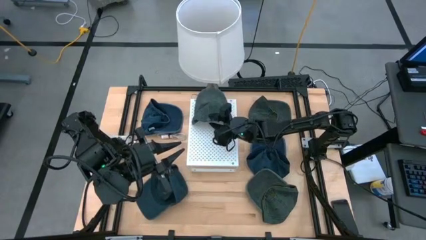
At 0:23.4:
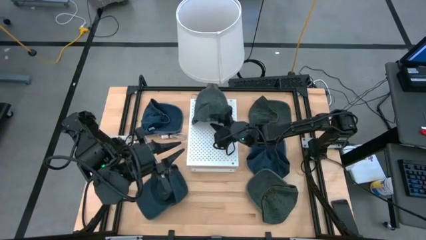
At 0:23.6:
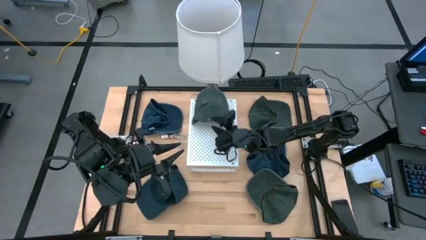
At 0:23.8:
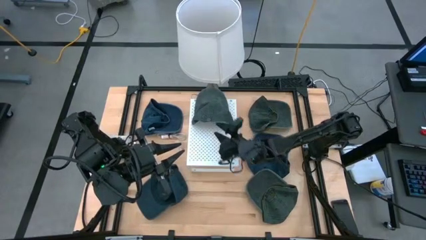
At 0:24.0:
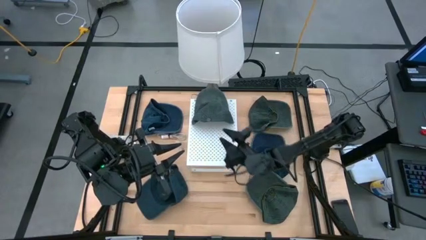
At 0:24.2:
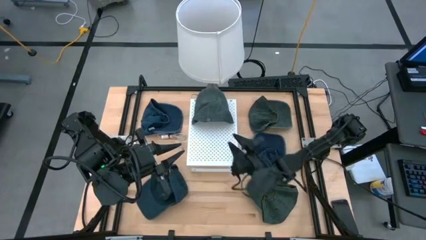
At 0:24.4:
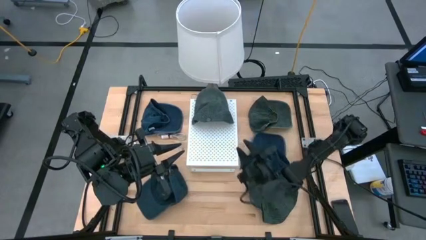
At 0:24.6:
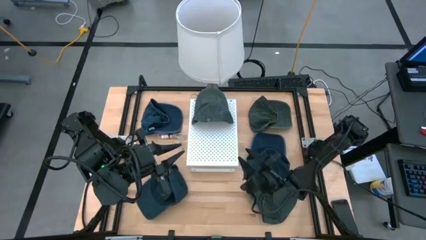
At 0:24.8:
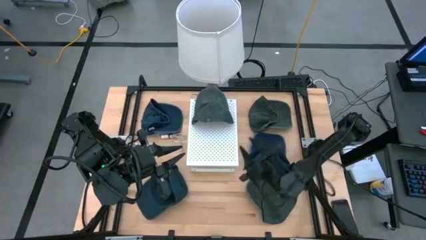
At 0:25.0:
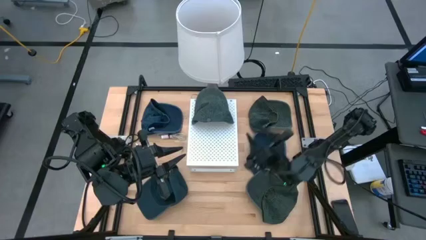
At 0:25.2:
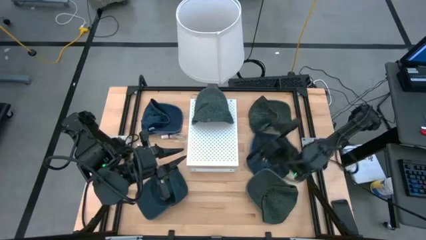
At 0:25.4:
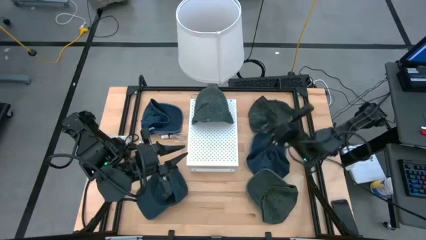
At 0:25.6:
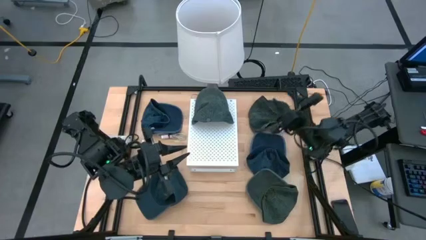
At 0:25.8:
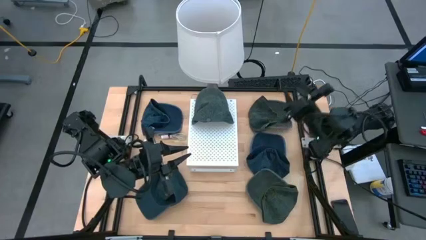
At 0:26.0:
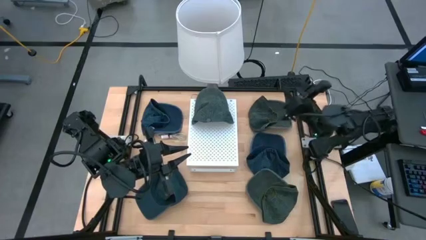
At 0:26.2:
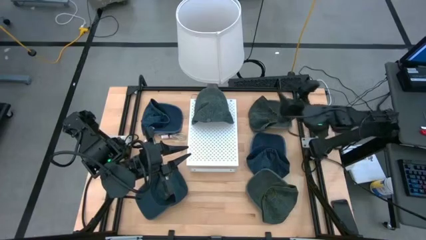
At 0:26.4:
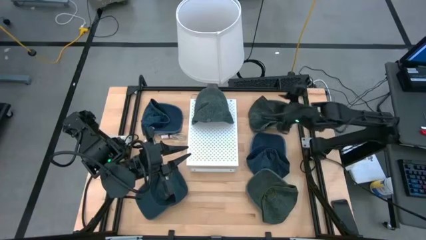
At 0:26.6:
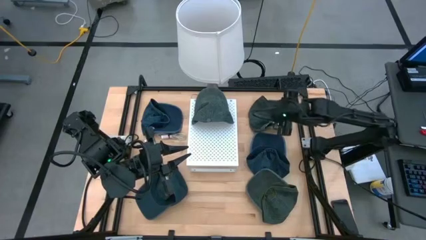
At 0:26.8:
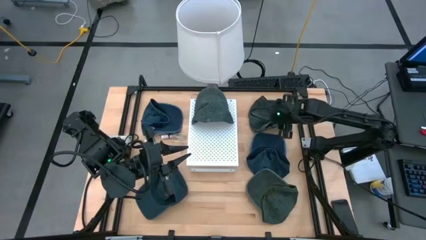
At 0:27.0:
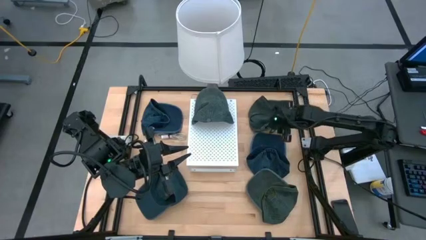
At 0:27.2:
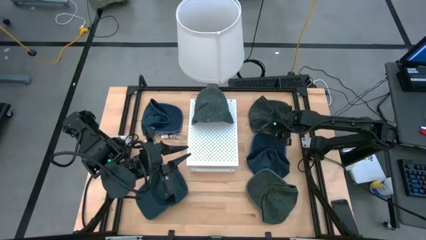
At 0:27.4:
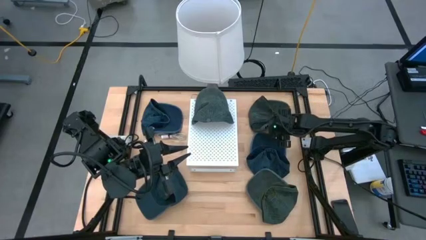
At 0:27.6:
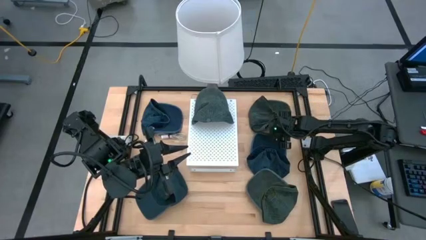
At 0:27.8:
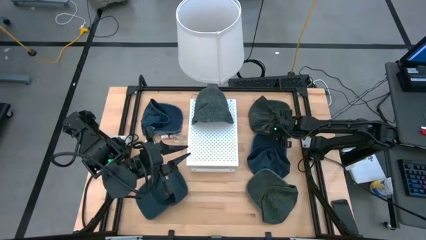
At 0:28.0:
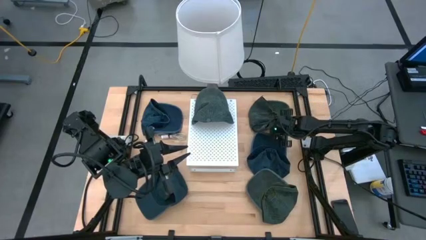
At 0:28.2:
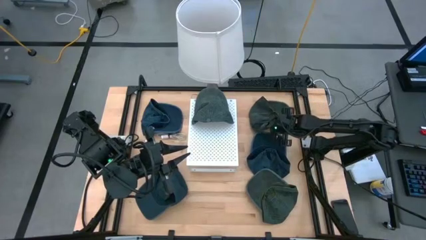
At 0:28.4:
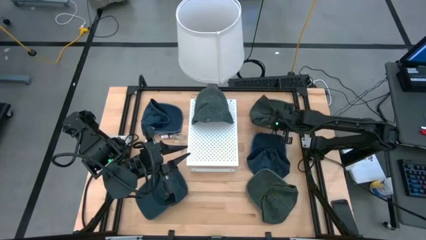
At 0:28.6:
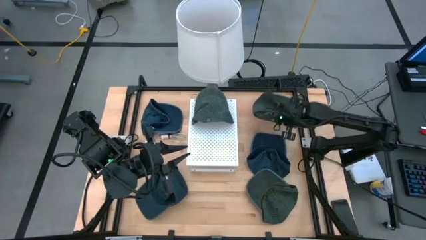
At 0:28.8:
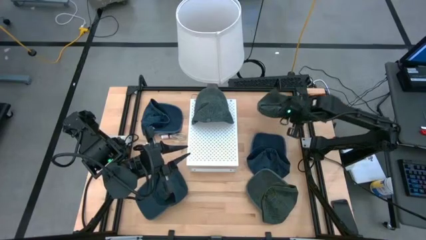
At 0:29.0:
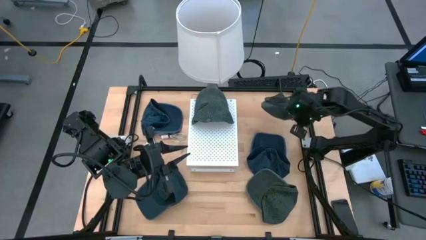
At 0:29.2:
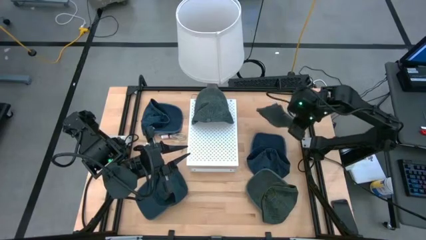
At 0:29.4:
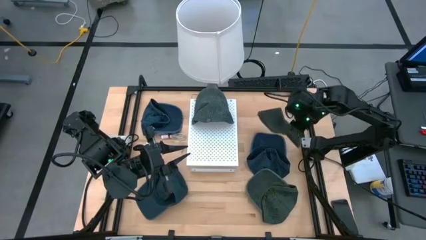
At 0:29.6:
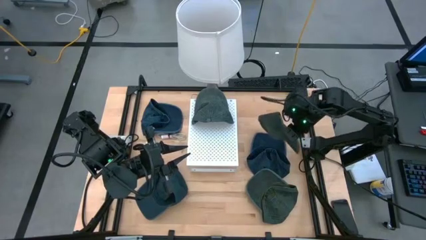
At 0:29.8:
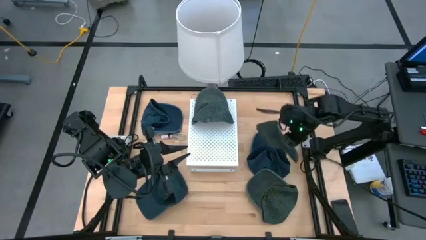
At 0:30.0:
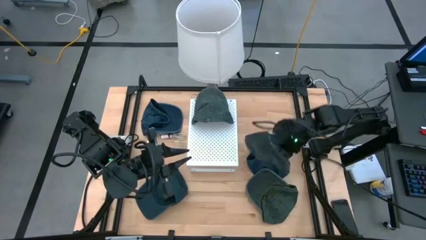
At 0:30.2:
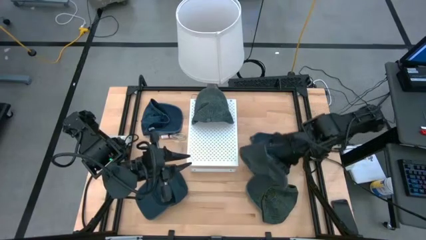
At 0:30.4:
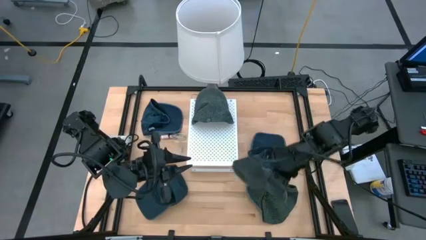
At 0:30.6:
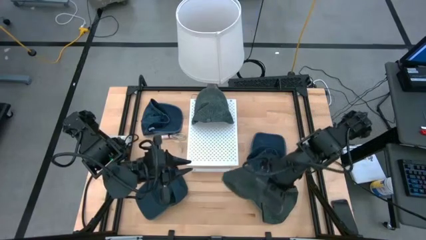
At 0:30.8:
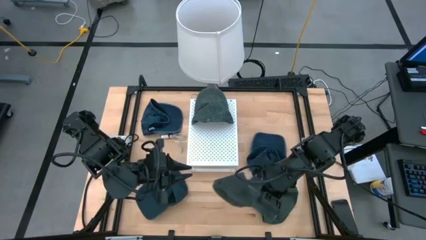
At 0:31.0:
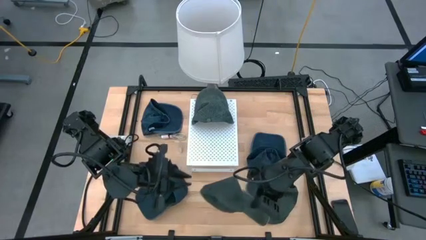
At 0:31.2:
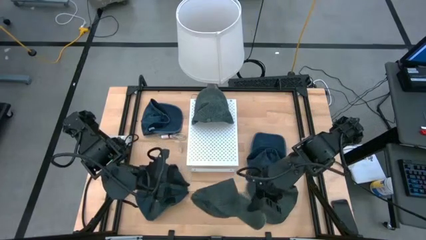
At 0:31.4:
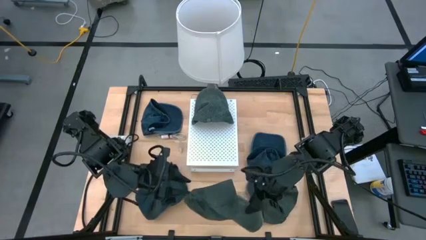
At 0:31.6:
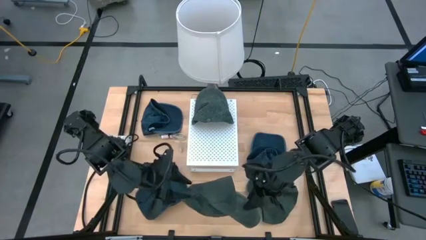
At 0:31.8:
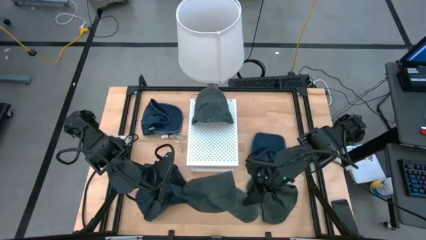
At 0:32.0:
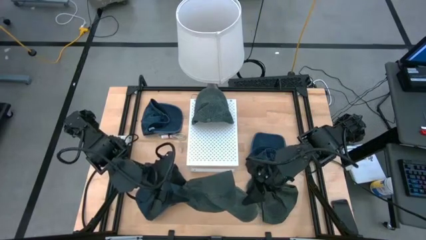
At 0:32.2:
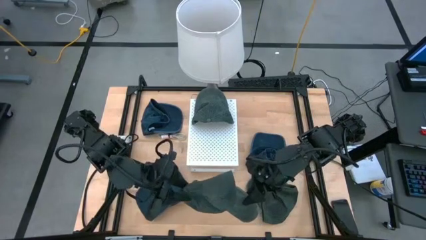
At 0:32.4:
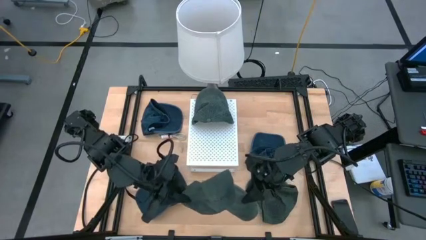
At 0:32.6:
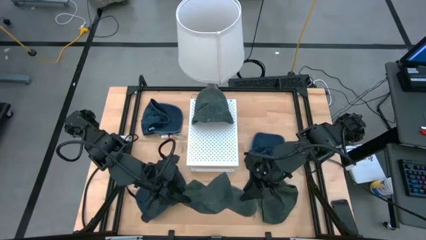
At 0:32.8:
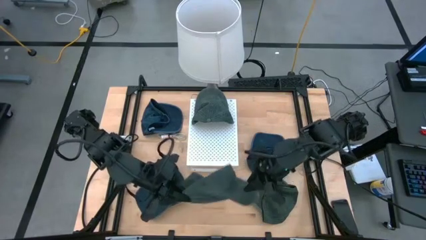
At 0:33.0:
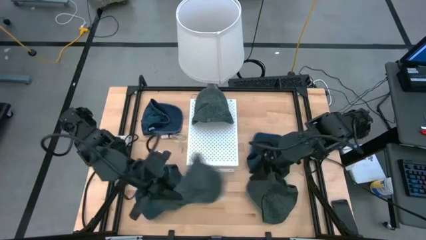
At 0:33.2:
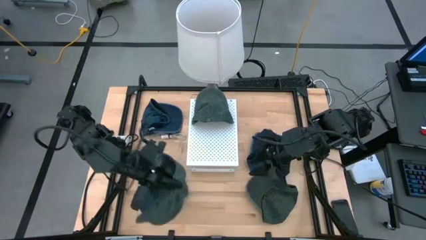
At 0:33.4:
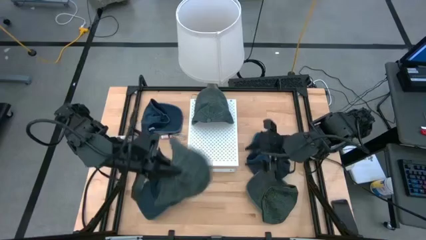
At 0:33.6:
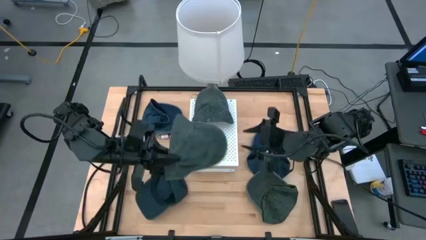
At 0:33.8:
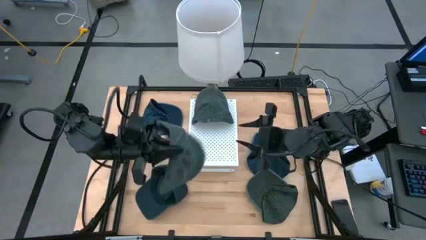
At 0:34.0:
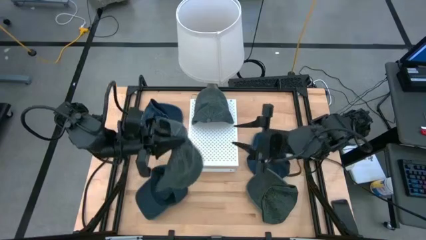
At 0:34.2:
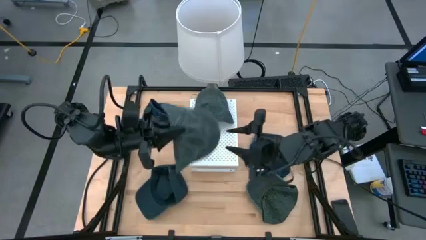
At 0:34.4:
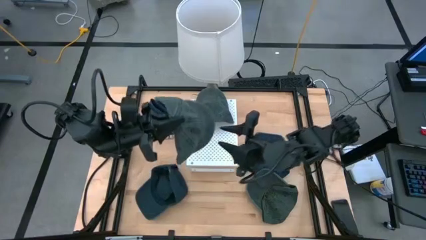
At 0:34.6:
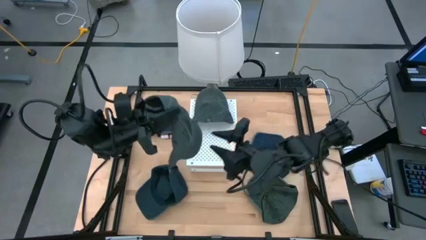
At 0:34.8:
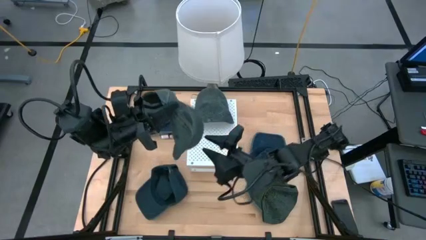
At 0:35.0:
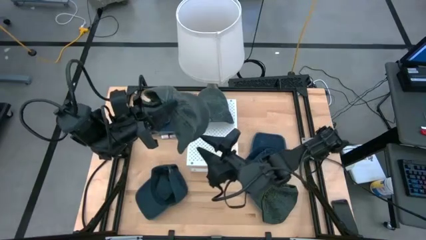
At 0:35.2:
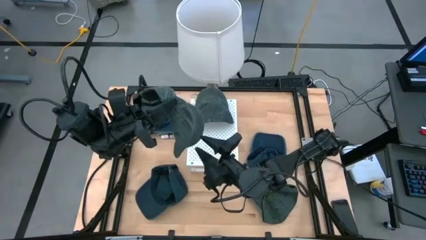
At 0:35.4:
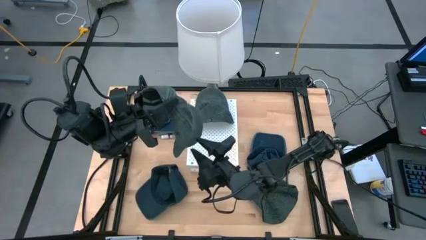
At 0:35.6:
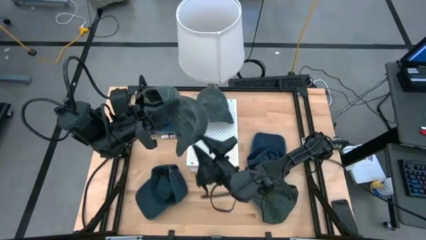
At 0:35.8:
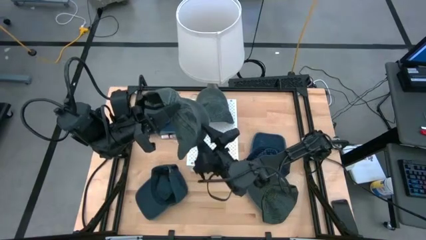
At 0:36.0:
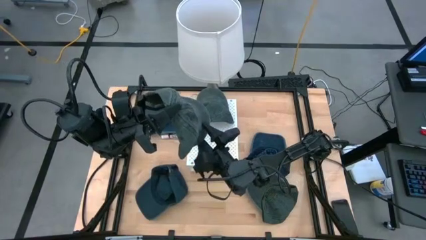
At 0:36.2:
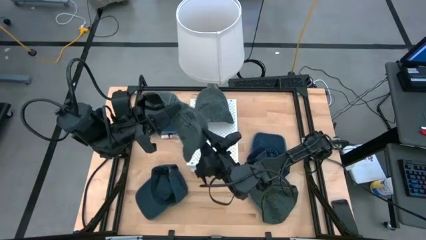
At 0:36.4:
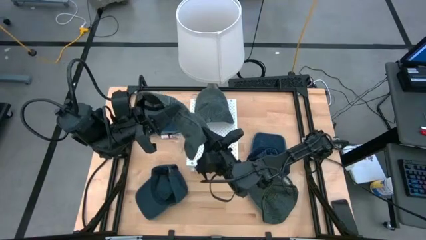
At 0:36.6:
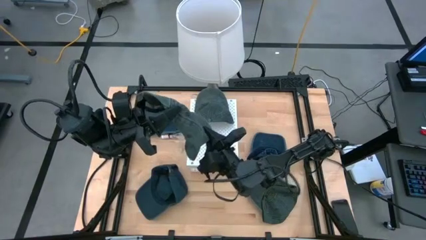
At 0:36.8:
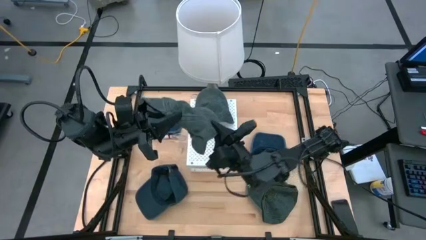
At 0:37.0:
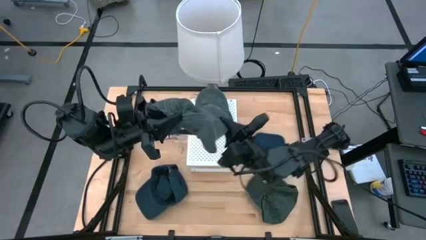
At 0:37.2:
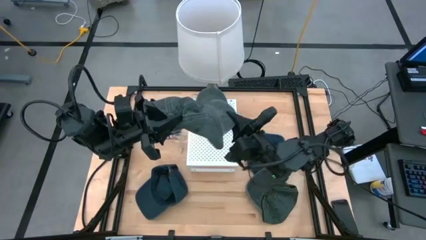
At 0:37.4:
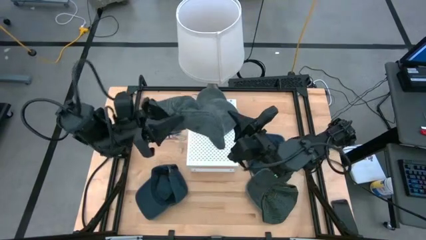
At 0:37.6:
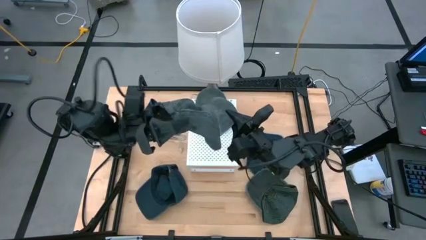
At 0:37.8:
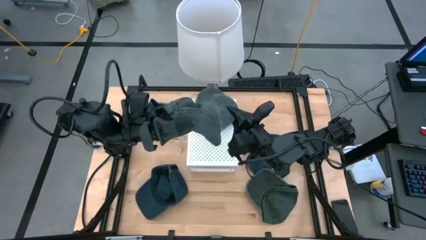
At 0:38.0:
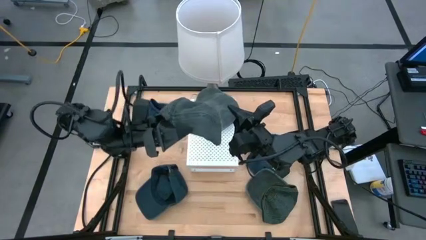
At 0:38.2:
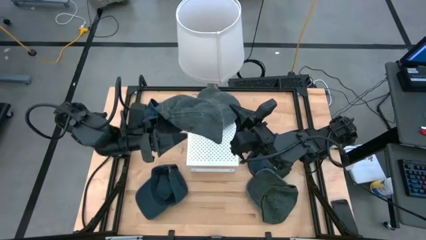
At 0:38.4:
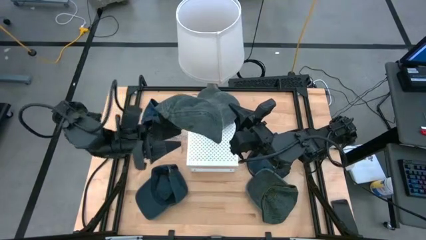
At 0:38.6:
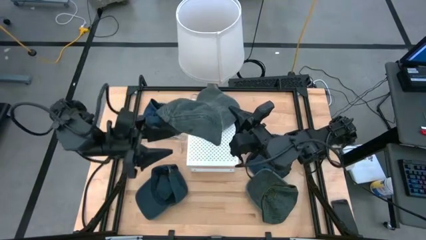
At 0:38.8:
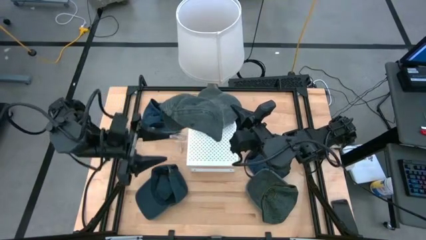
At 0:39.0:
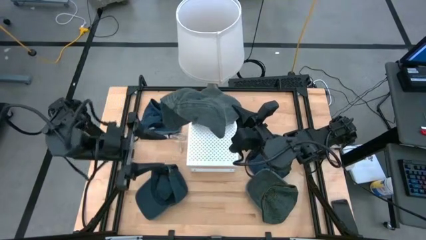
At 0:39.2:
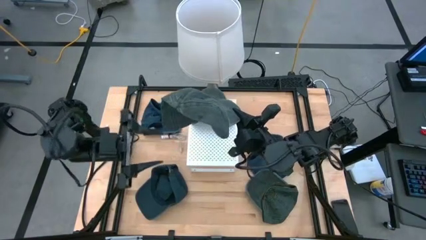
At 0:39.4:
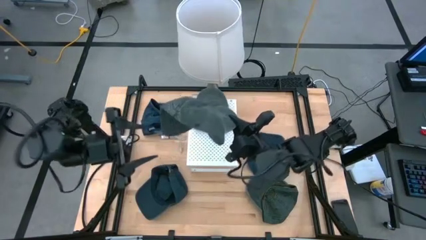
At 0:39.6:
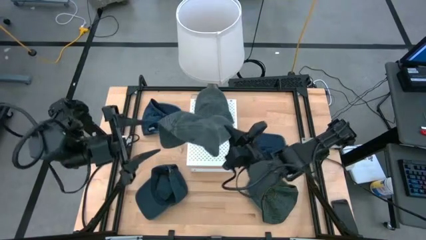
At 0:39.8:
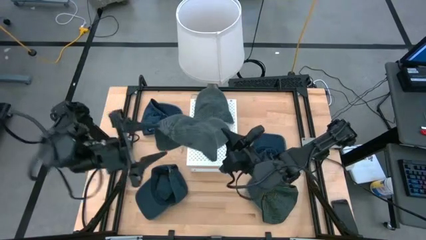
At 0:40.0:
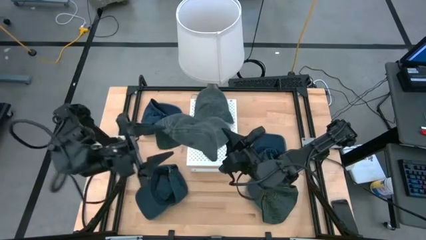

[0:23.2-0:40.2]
Task: Pick & Place hat
Stack the top gray cap on the gray cap on the shelf
